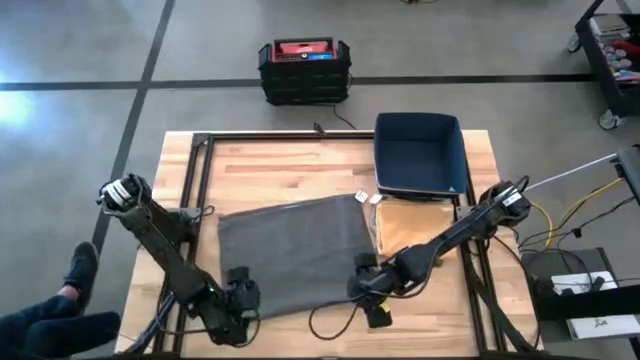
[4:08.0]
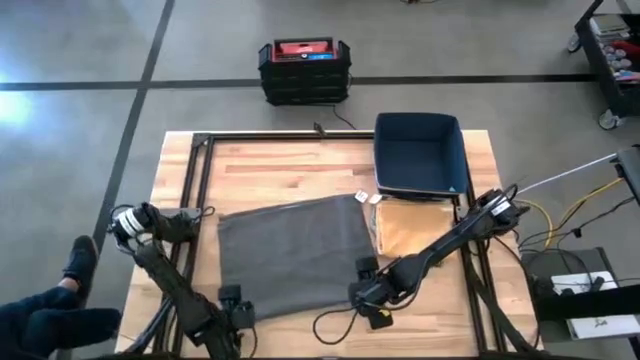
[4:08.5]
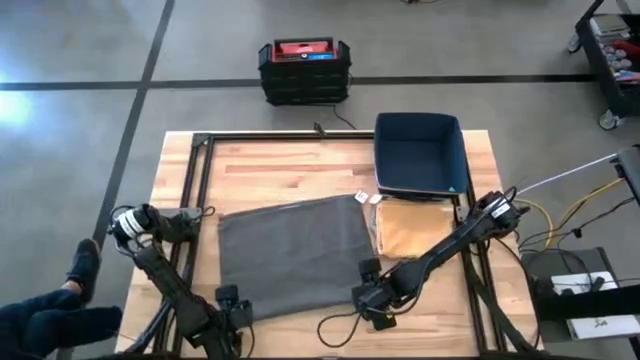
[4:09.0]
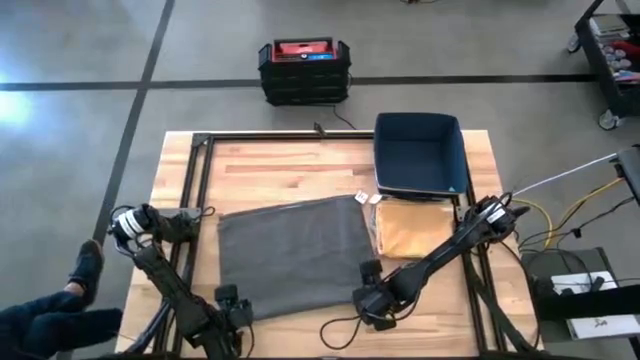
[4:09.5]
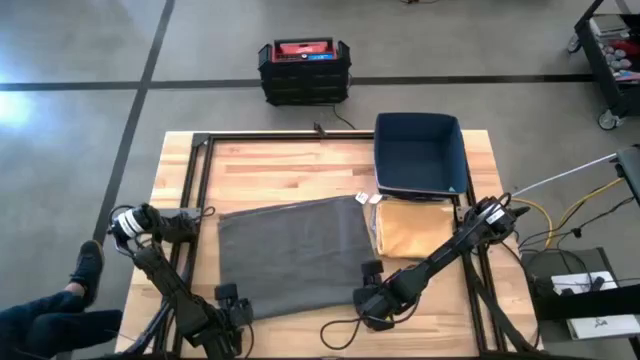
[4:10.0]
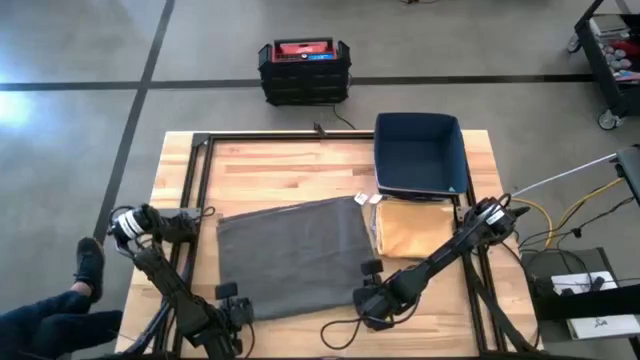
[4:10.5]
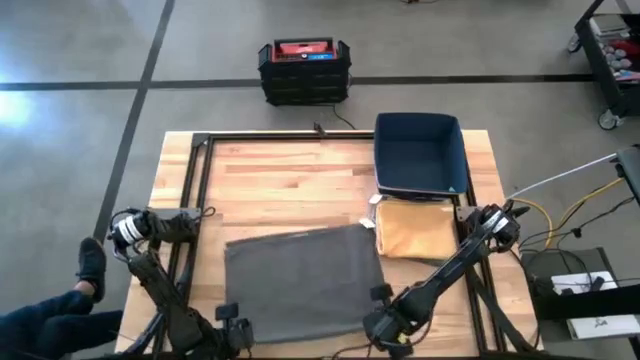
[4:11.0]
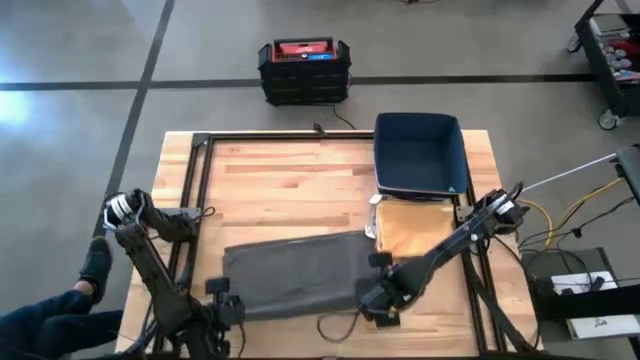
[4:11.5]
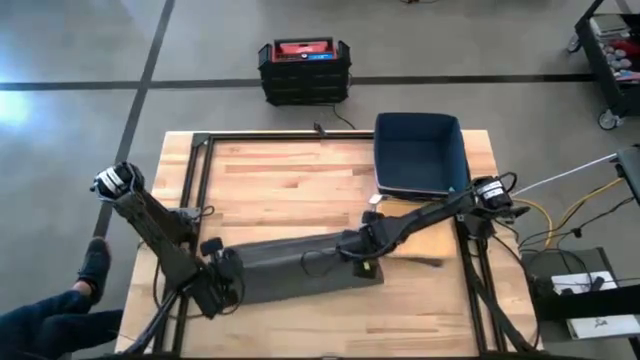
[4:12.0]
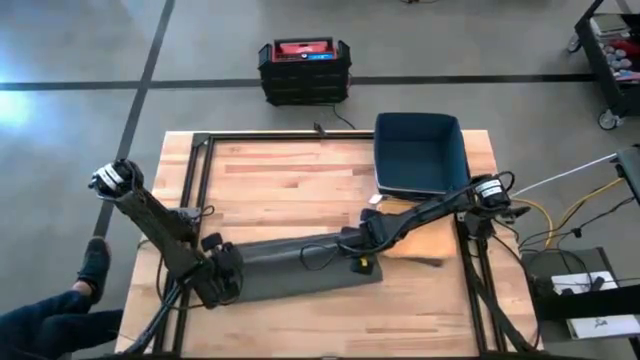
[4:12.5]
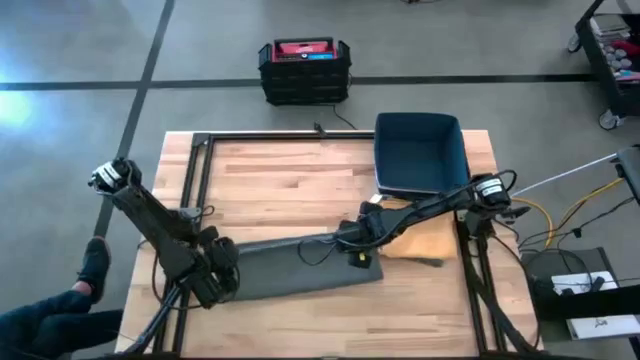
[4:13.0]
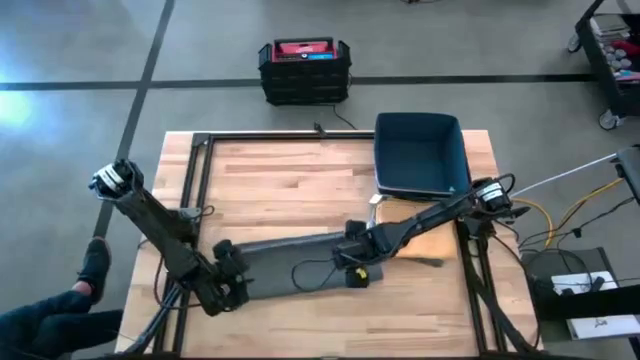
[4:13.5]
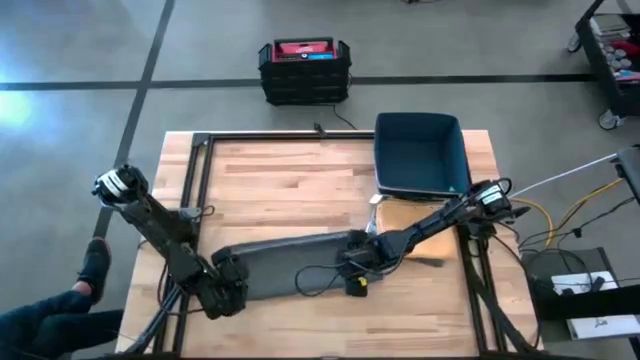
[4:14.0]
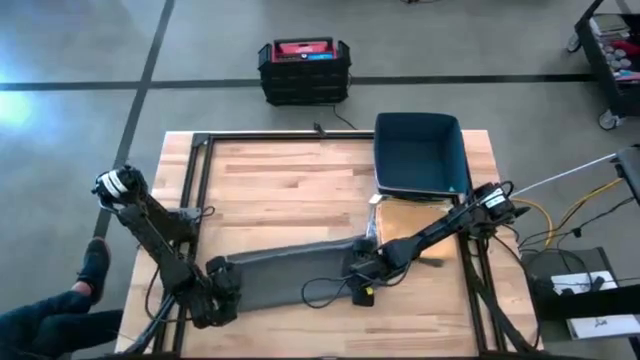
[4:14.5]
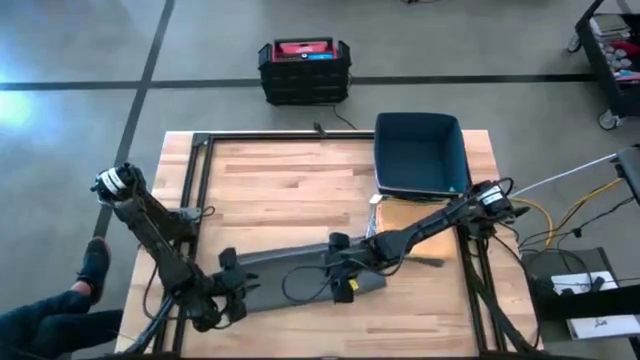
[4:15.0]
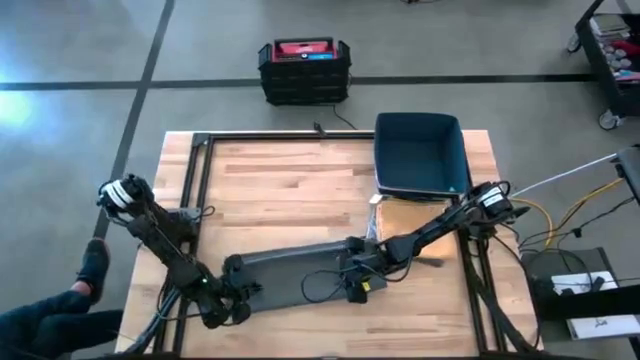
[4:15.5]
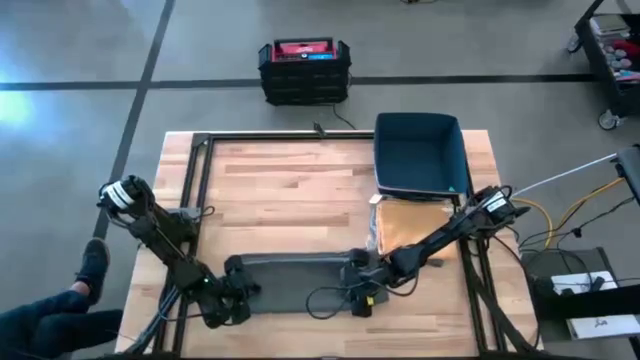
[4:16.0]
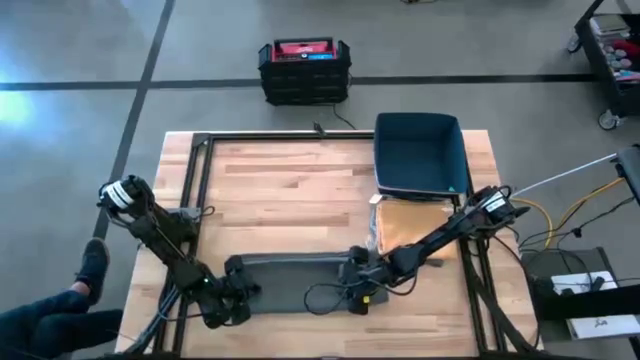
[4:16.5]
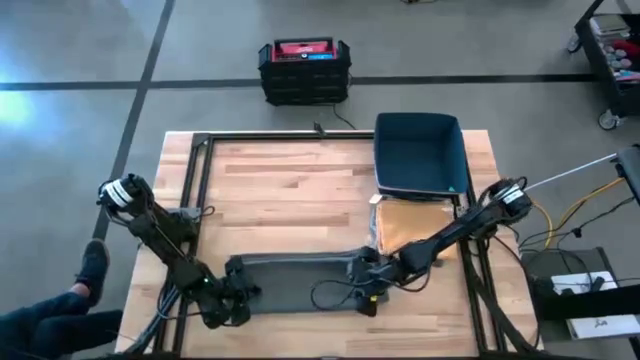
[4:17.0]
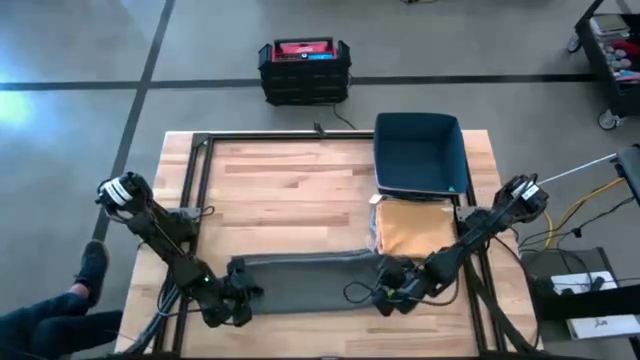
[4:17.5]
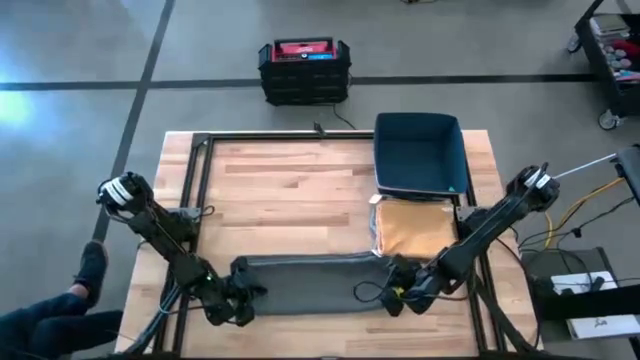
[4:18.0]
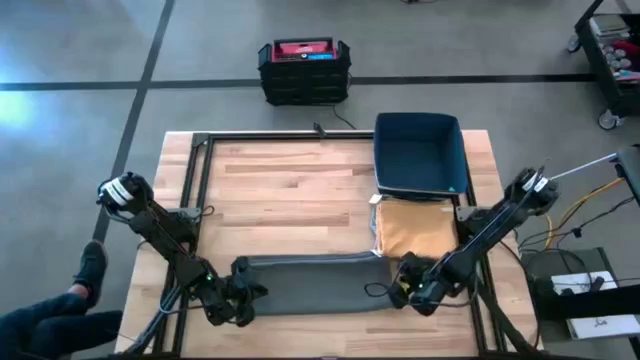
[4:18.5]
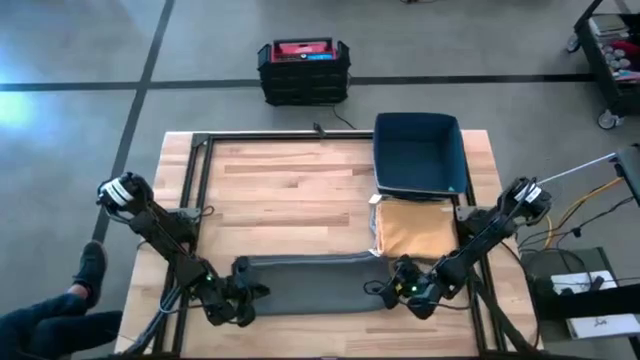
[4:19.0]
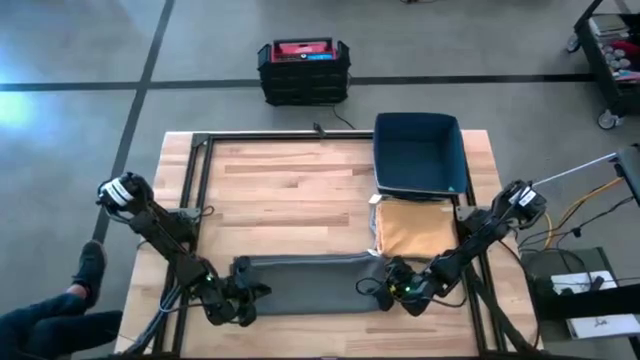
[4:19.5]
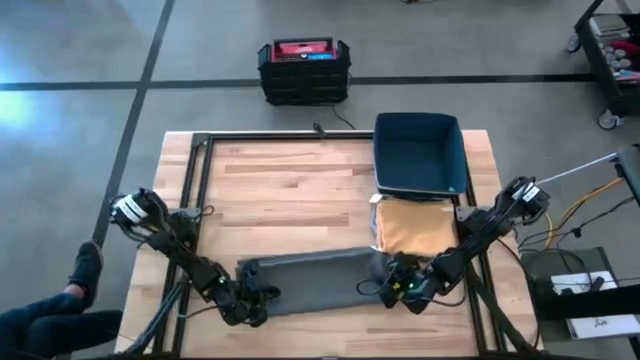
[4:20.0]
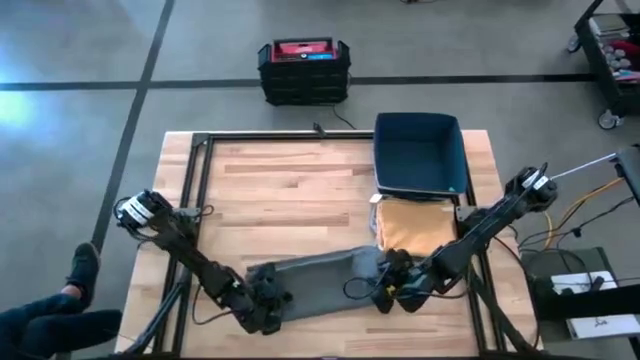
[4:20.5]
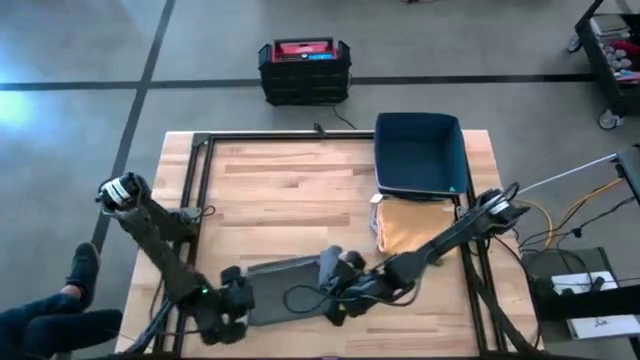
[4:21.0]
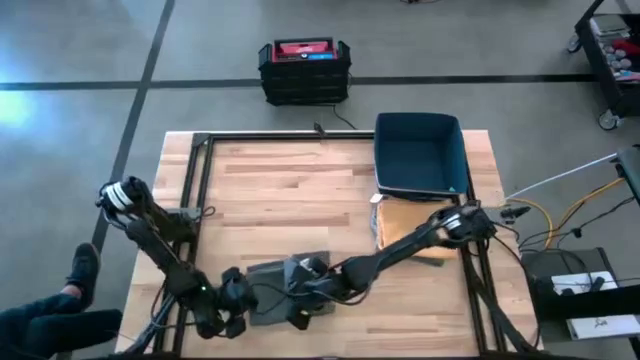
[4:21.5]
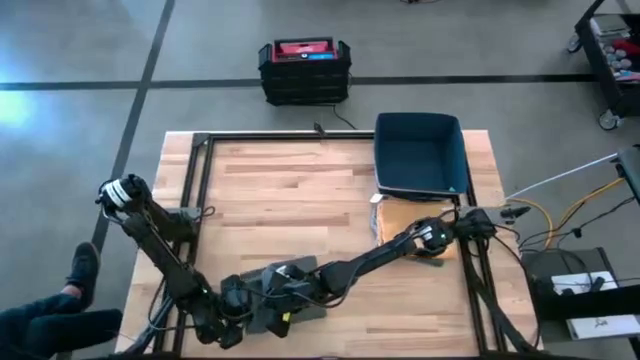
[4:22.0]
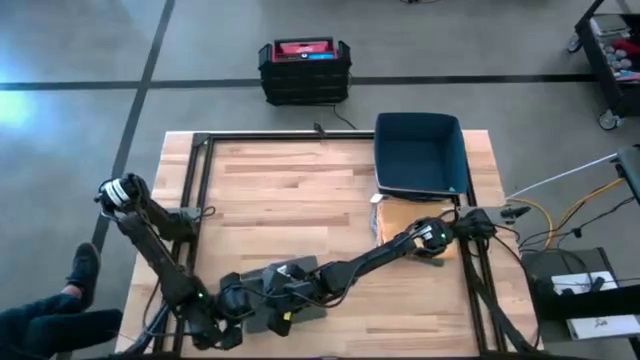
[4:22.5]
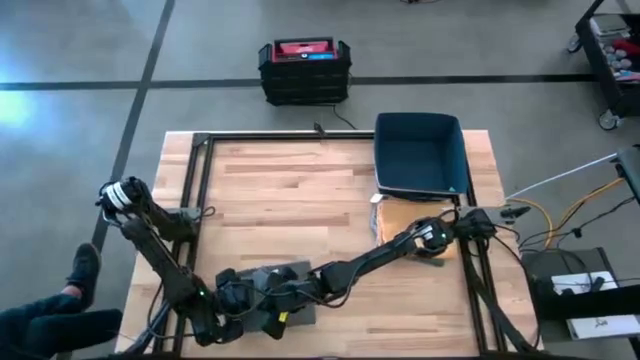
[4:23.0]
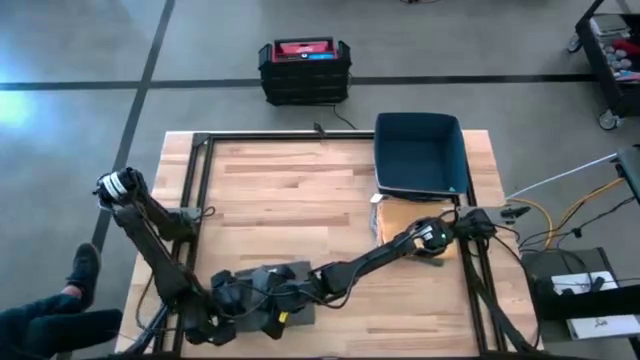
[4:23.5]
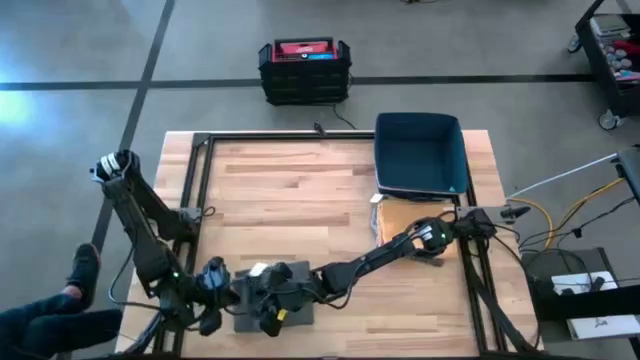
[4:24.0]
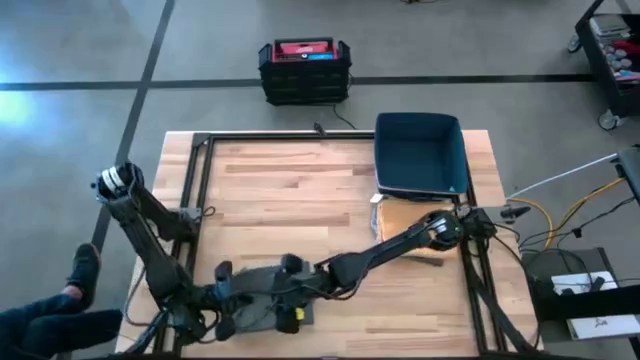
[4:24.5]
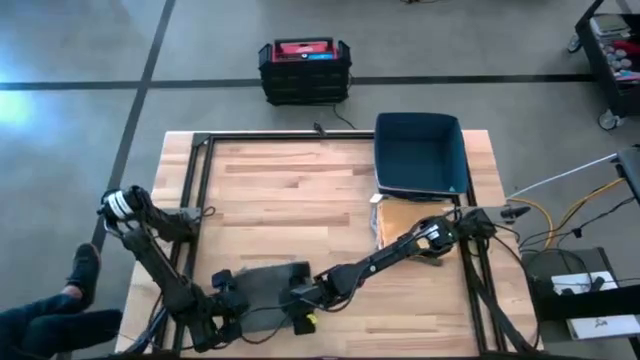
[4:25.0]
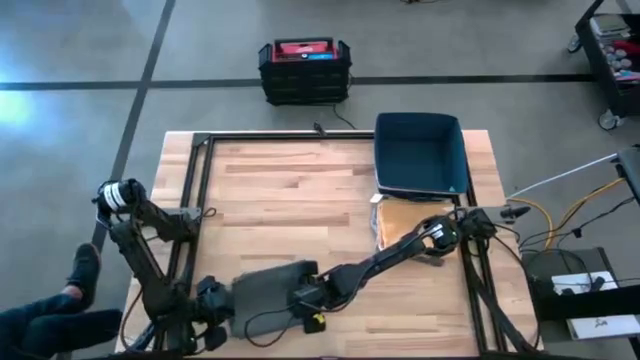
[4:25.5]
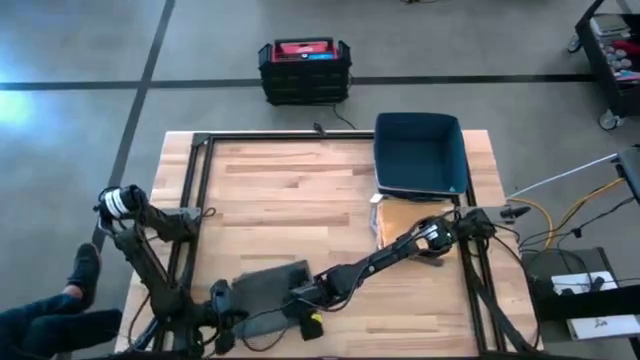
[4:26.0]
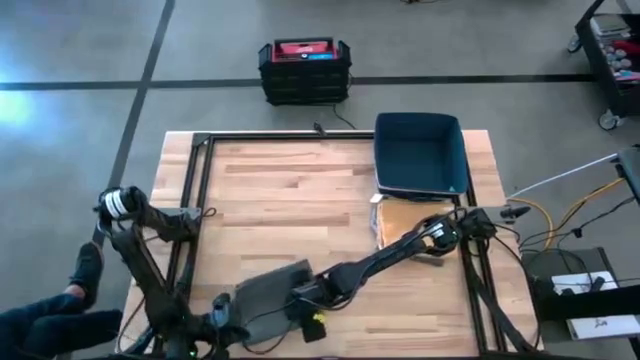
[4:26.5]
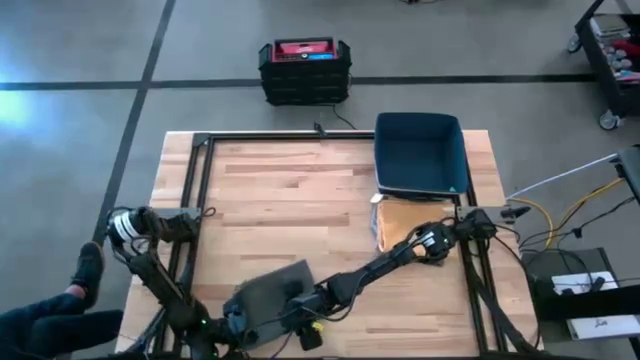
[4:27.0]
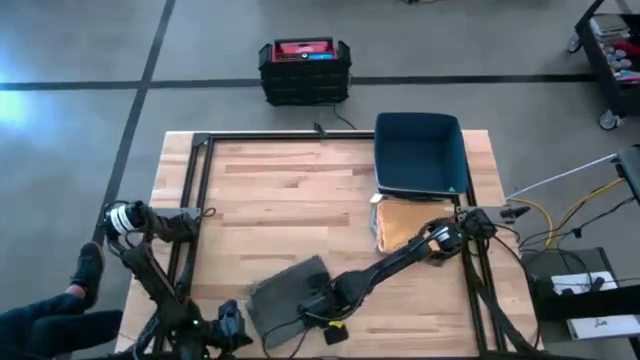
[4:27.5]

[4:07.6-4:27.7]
Task: Fold towel
Fold the gray kitchen towel

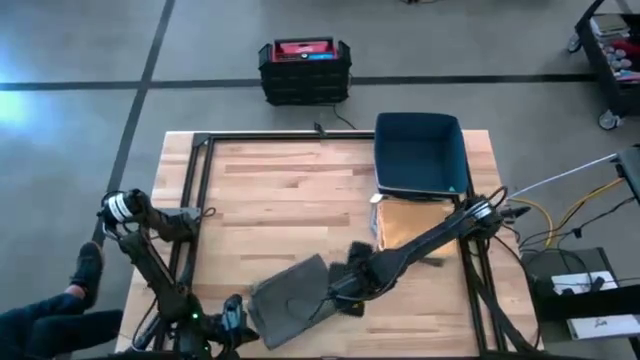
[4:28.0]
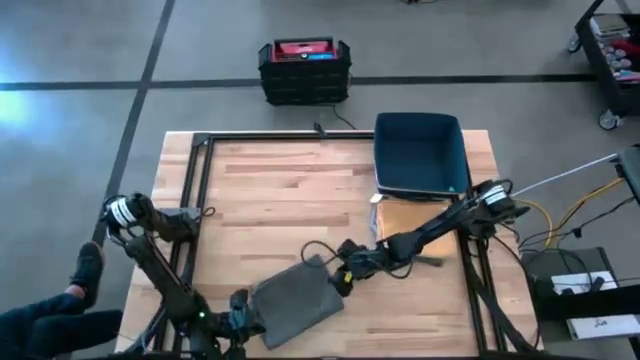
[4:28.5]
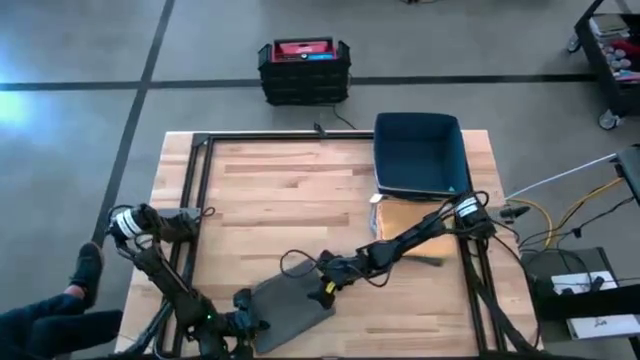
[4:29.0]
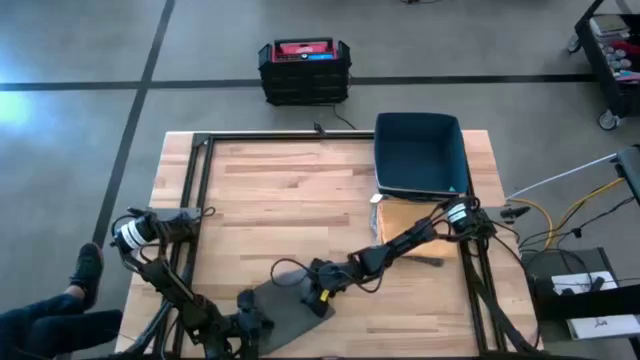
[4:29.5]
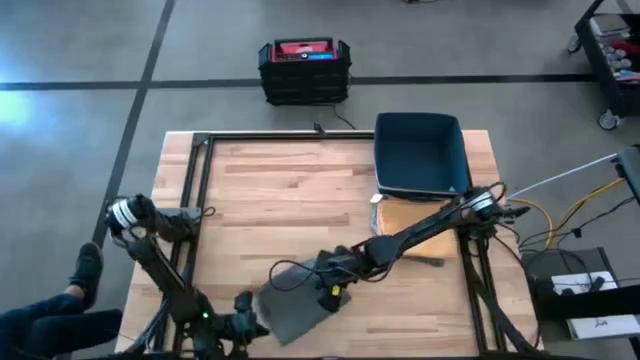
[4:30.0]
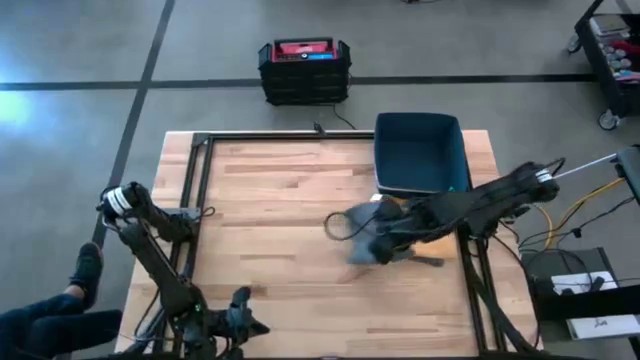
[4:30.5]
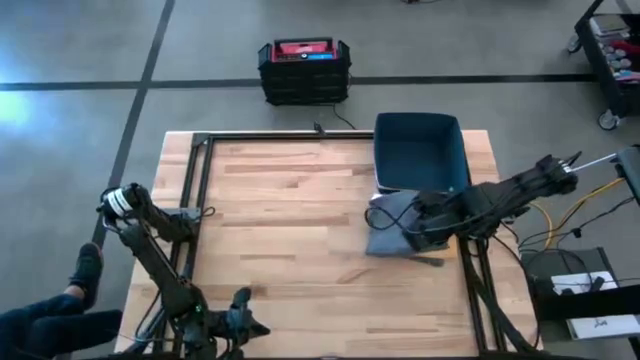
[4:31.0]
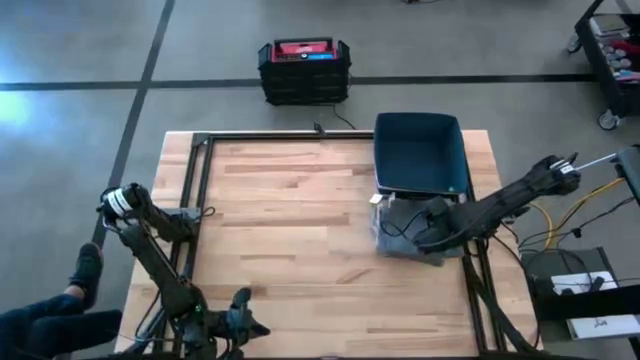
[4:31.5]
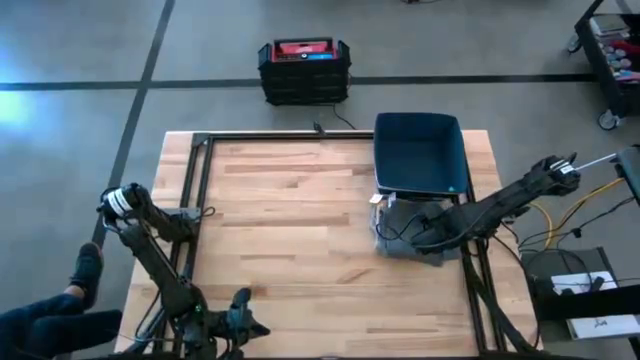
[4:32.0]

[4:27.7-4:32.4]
Stack the gray kitchen towel on top of the yellow kitchen towel
